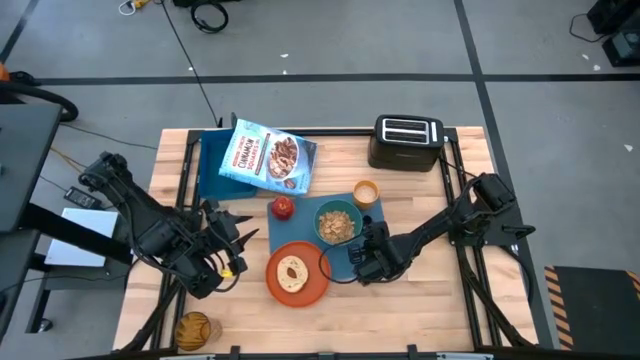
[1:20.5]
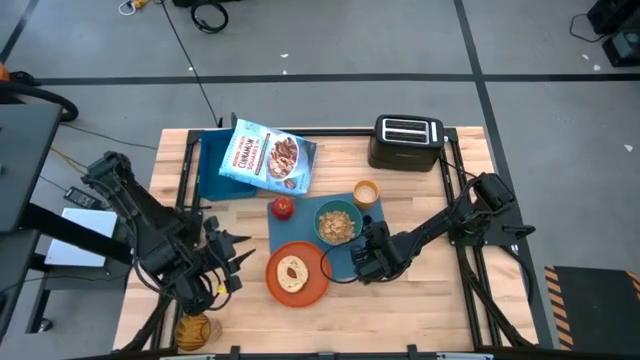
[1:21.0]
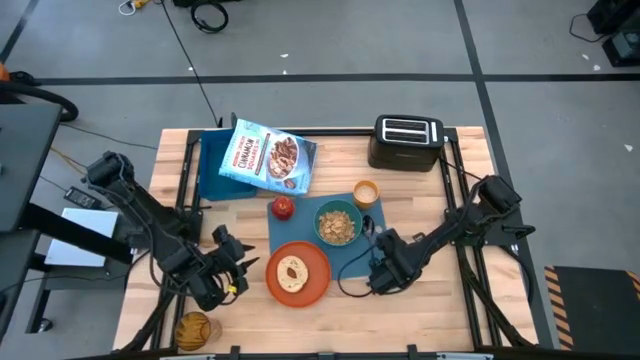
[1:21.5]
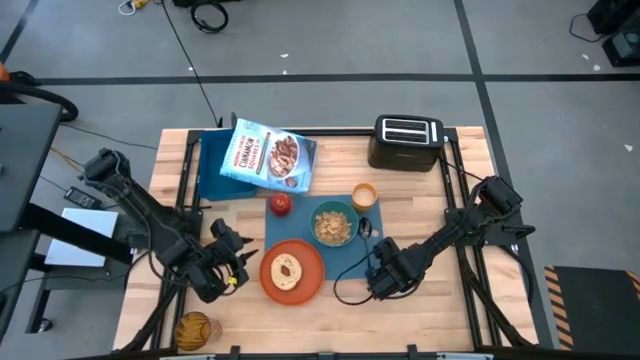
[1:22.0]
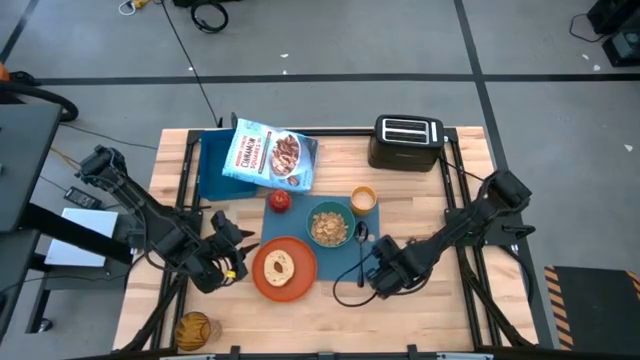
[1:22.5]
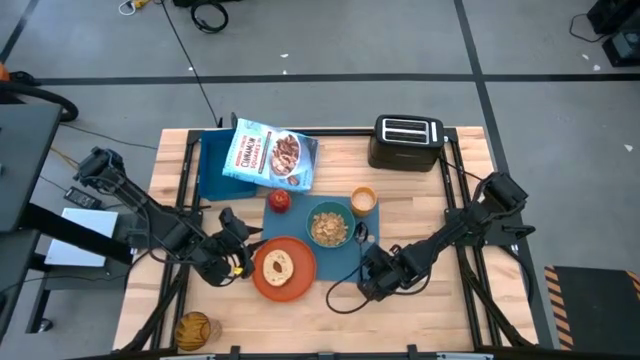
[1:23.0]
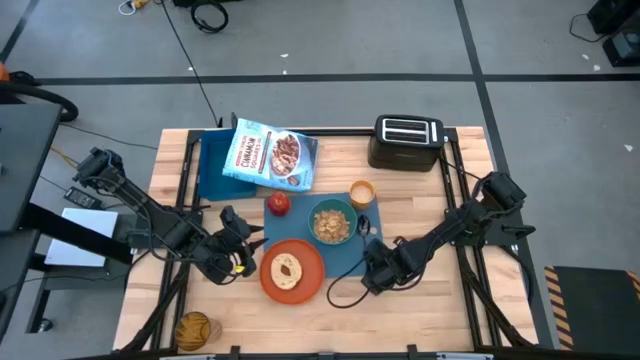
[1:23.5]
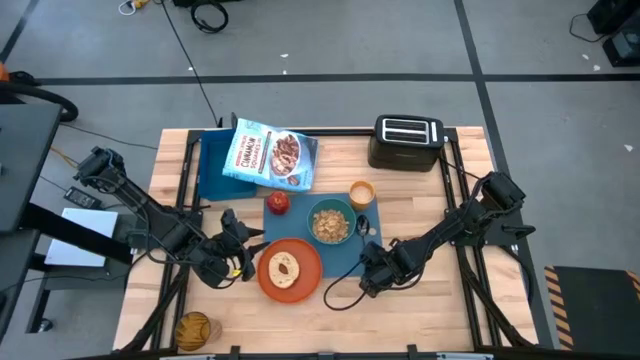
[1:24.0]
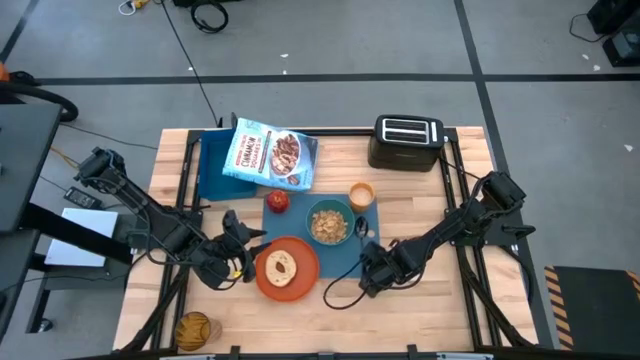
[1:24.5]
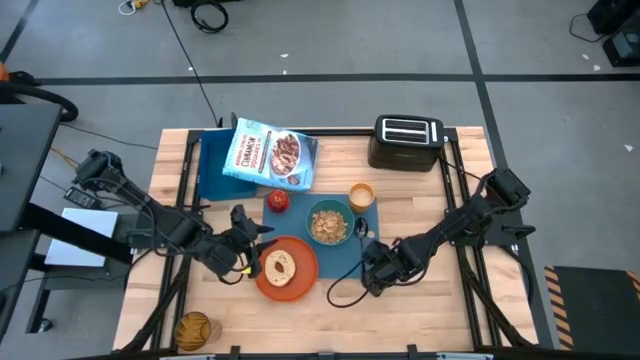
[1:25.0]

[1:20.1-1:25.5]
Task: Arrange a breakfast setting
Adjust the blue table mat

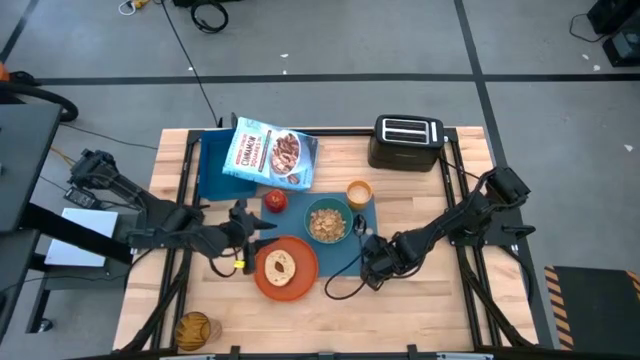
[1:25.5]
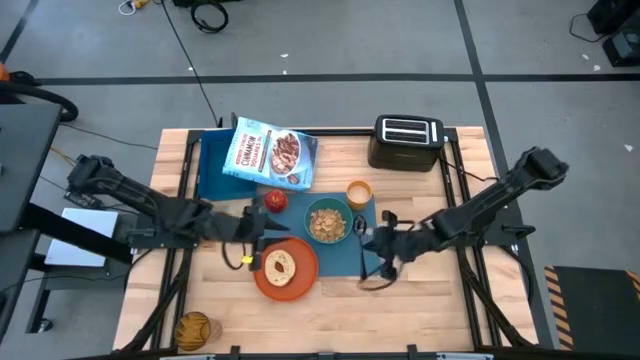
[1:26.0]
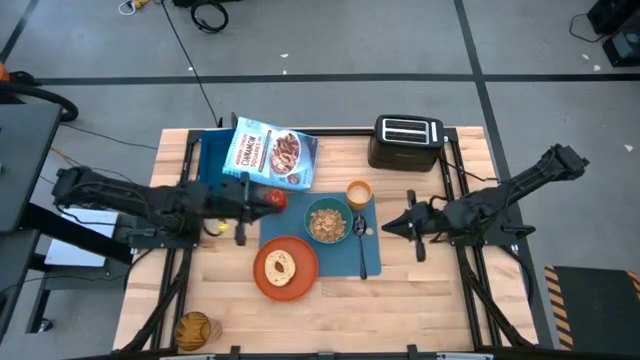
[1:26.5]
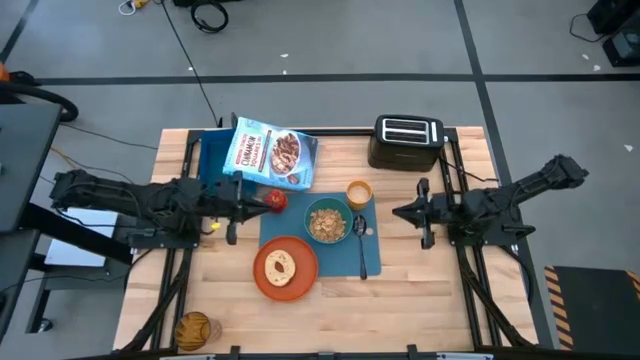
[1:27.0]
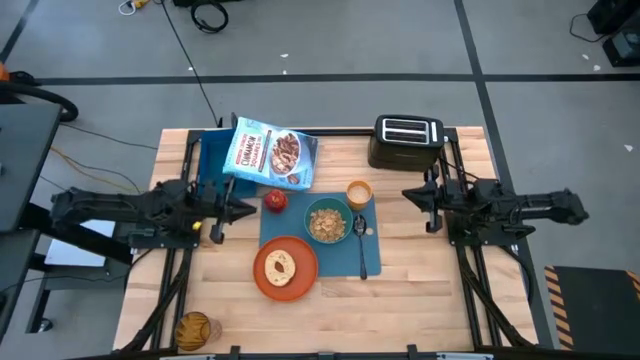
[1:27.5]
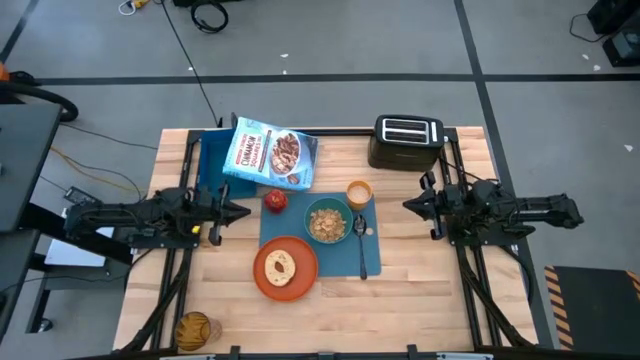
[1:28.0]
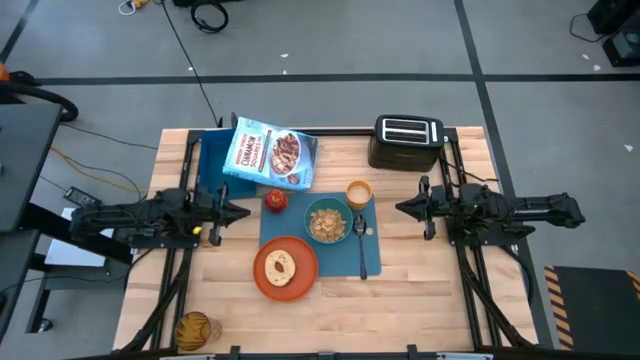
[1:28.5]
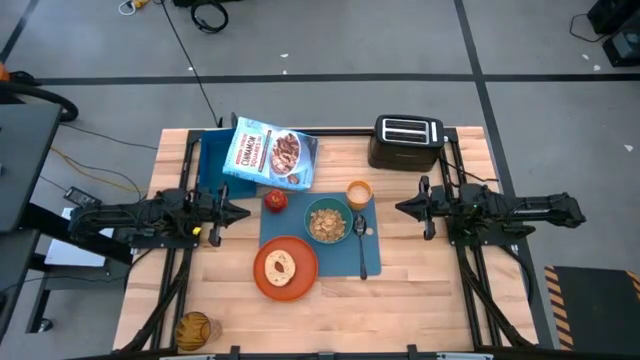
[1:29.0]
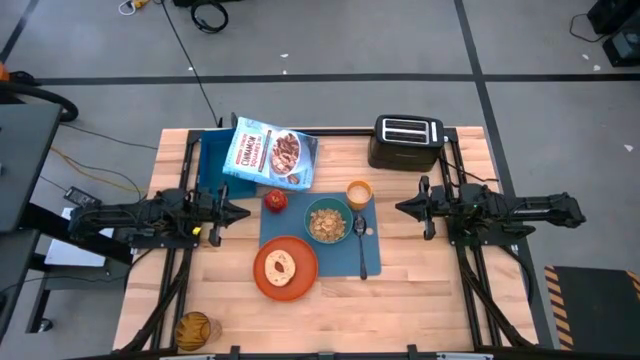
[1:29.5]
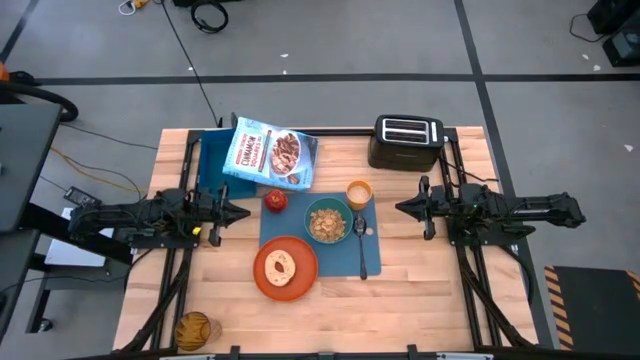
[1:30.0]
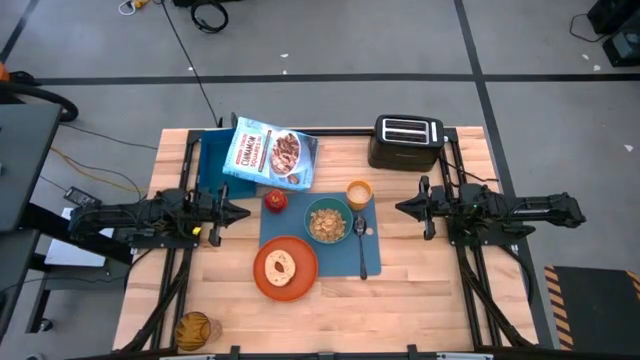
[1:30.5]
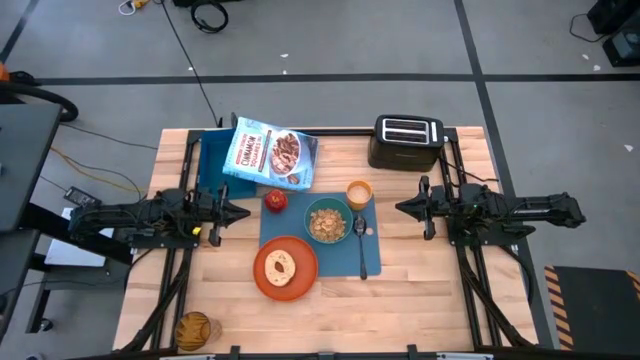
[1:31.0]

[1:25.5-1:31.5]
Return to Home Position

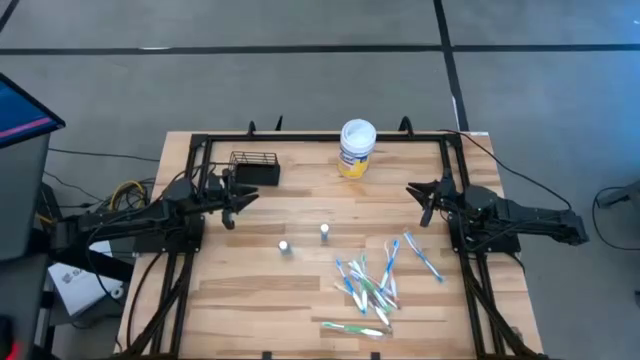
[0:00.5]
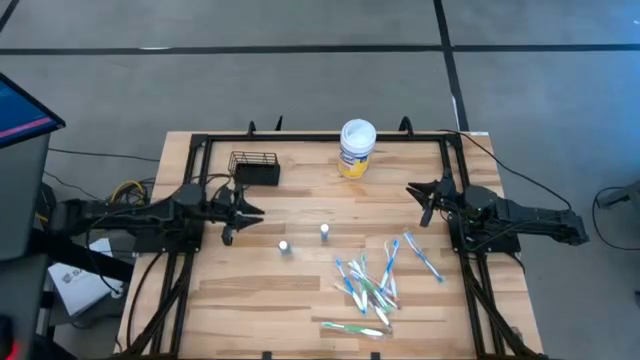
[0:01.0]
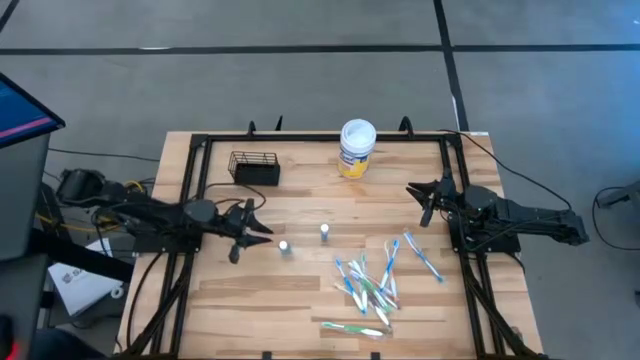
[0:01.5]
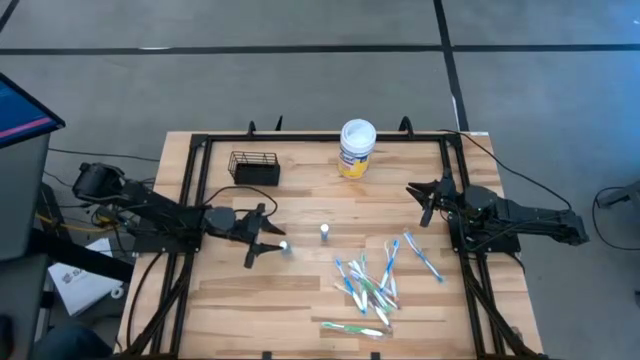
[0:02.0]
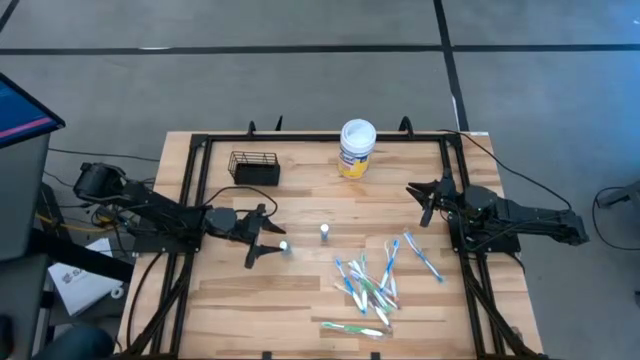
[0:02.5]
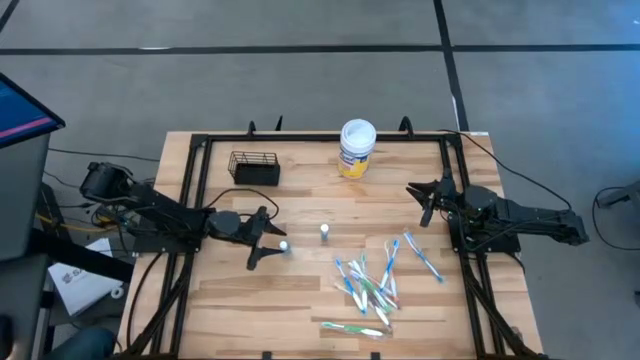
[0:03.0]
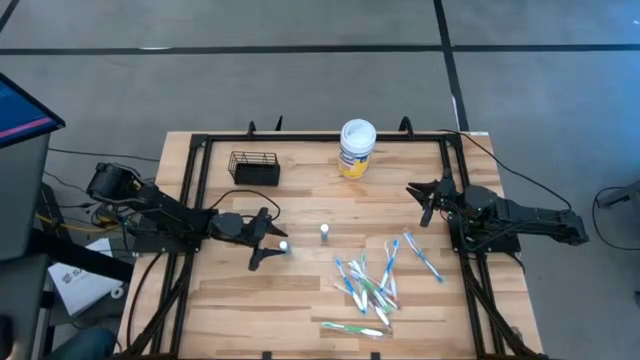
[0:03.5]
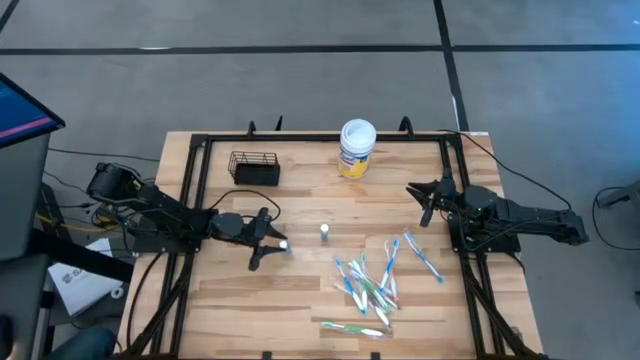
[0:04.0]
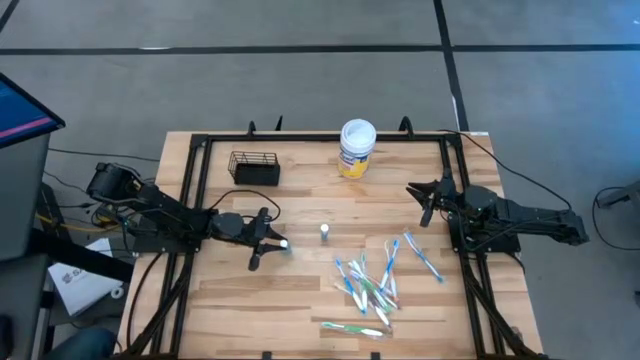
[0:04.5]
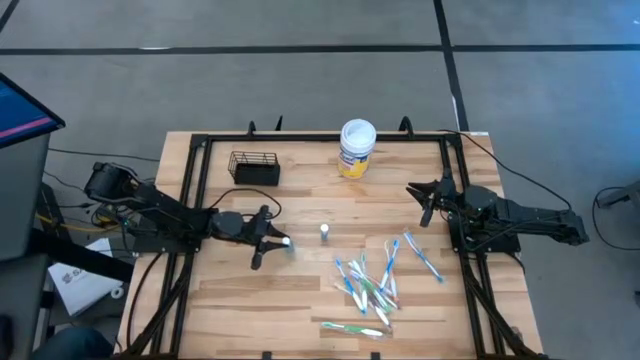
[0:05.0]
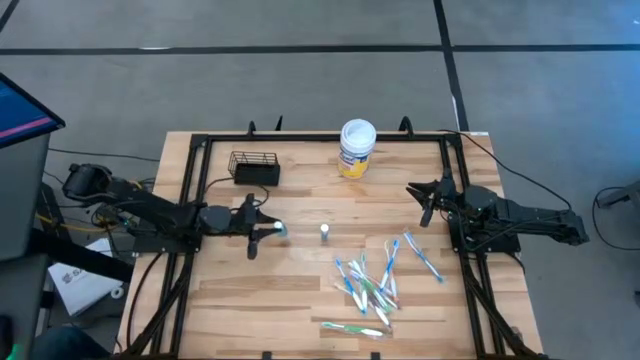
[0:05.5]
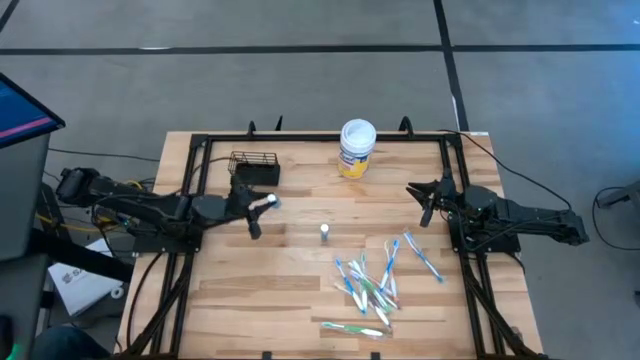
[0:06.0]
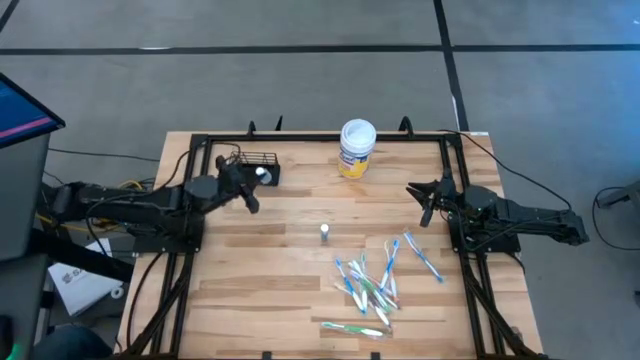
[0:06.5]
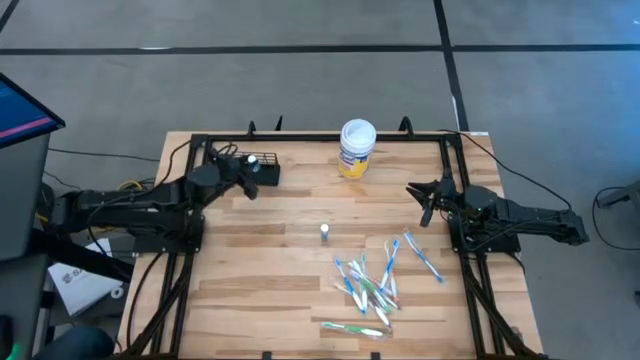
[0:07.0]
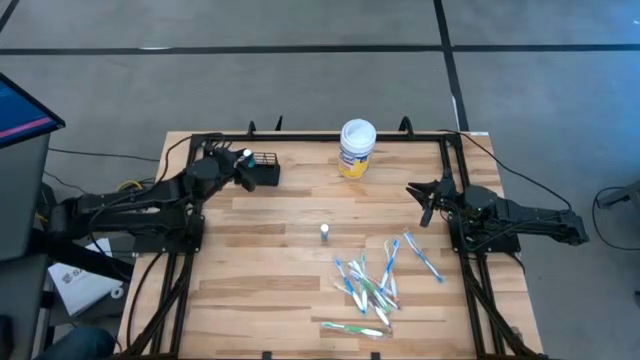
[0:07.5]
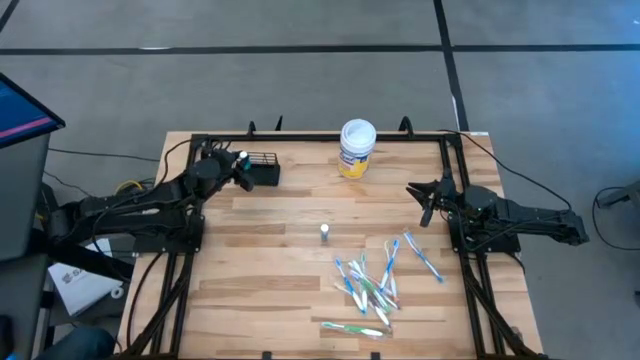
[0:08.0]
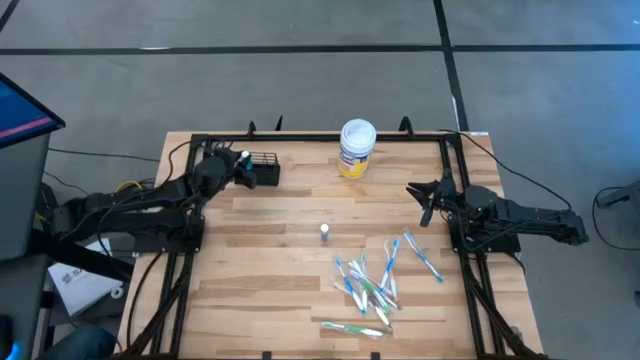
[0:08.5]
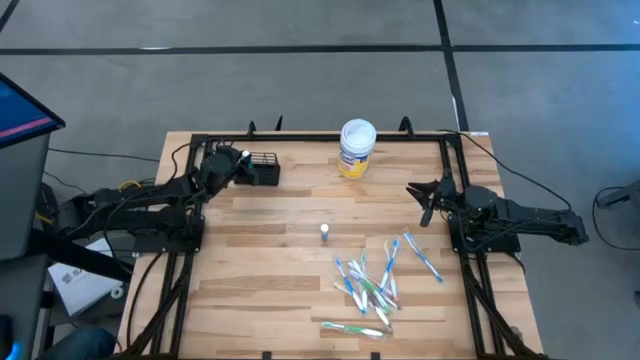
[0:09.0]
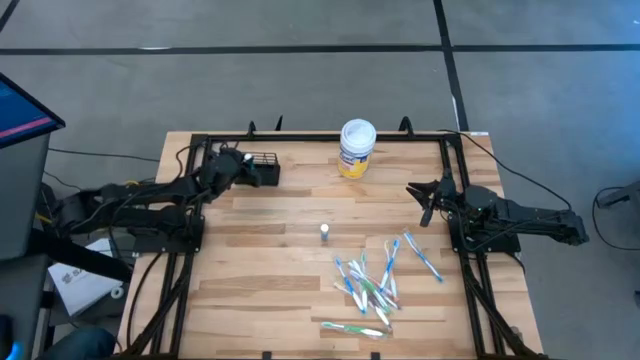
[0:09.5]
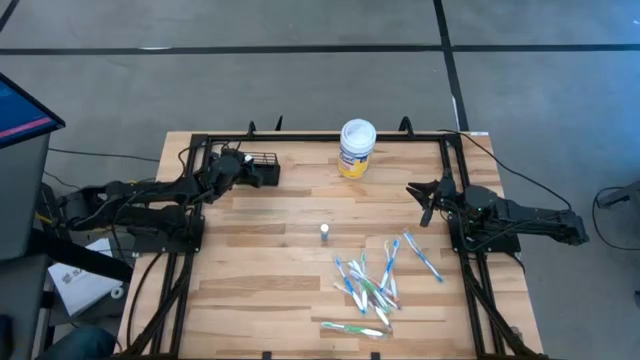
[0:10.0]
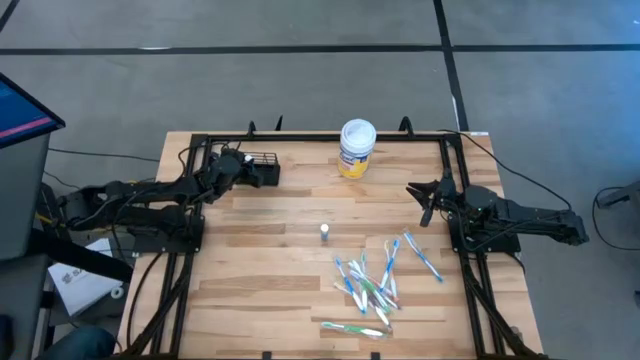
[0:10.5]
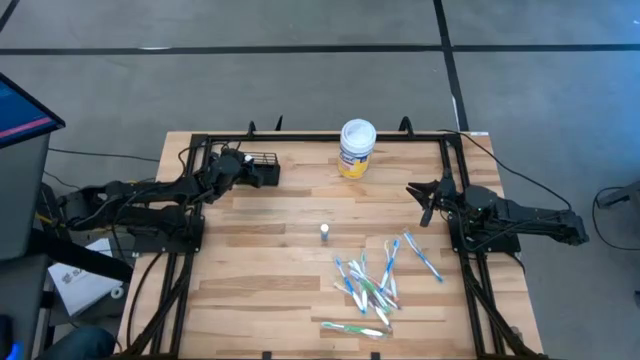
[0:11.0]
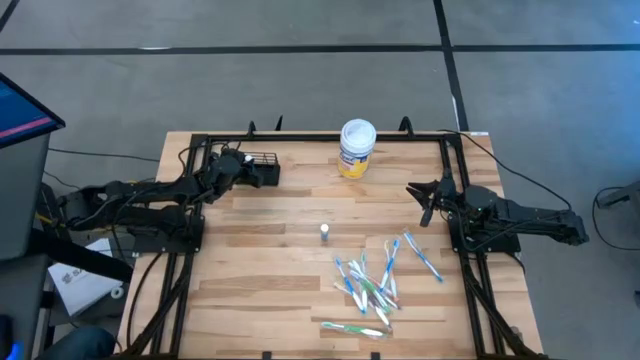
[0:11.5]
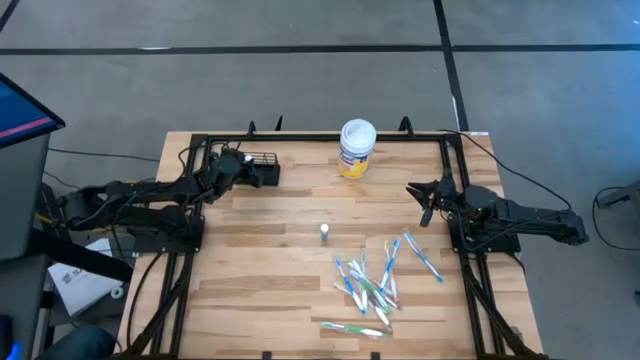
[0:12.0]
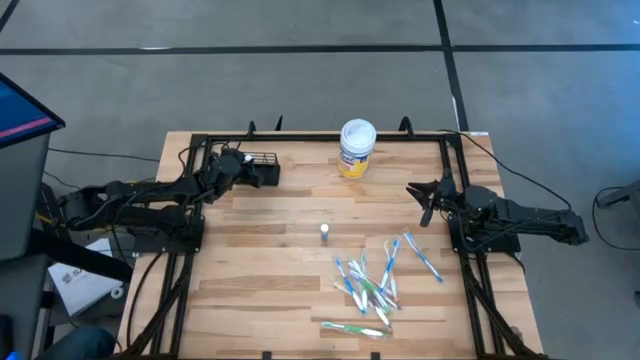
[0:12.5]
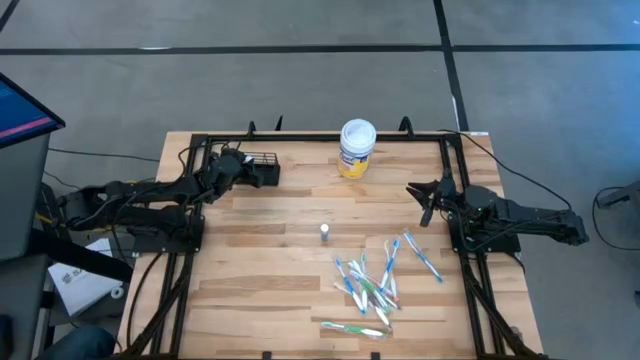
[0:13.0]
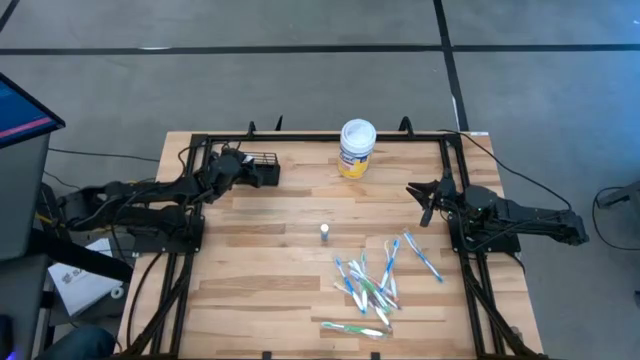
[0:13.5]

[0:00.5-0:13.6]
Task: Pick & Place toothbrushing station
Put the left blue mouthwash into the mesh organizer
